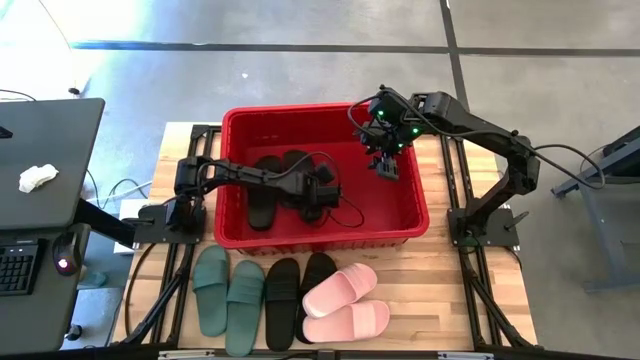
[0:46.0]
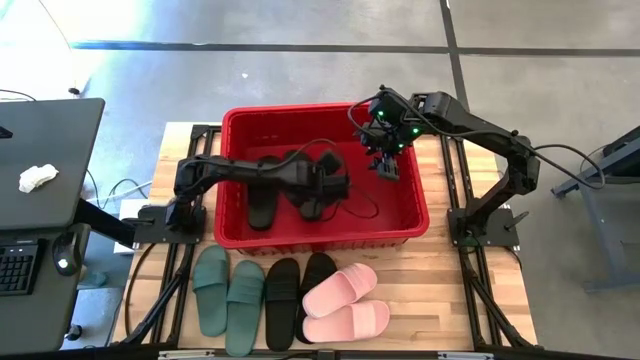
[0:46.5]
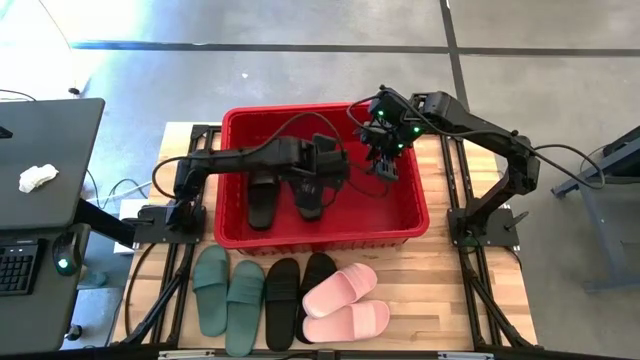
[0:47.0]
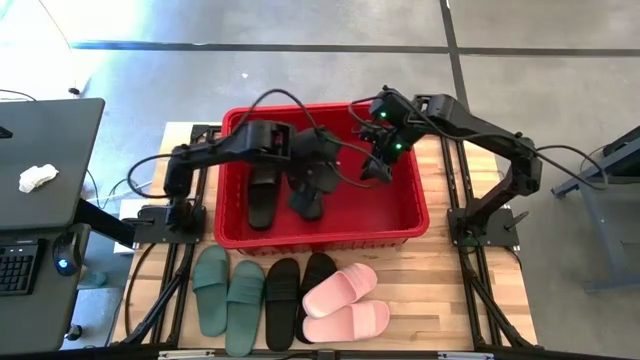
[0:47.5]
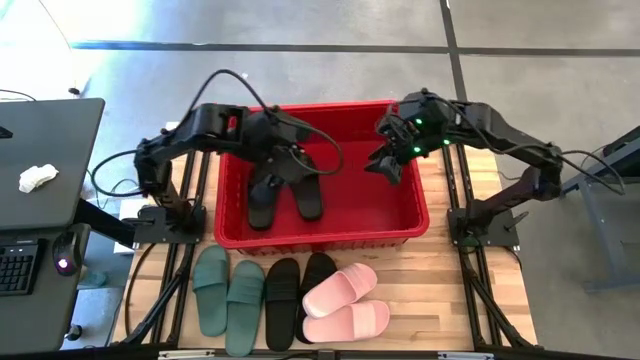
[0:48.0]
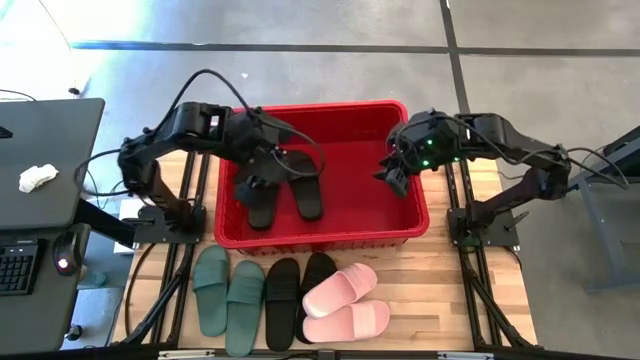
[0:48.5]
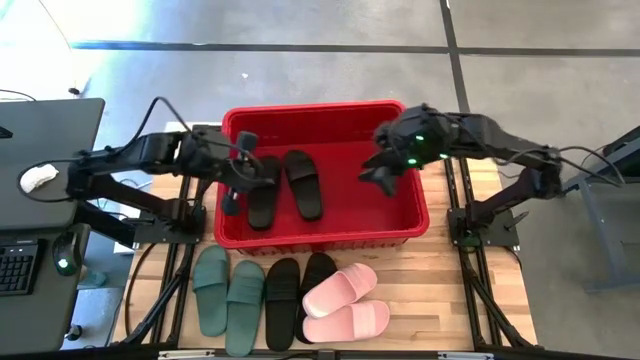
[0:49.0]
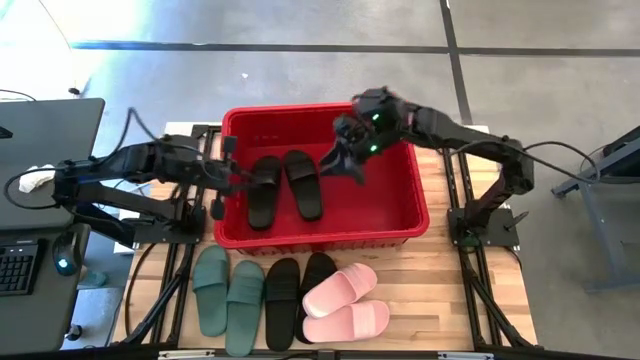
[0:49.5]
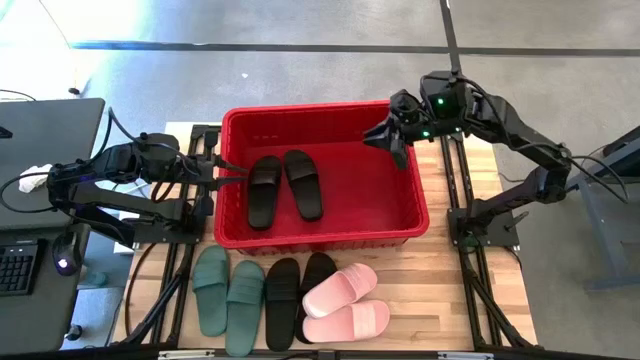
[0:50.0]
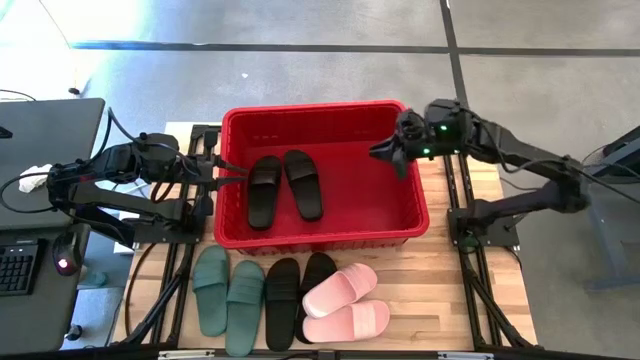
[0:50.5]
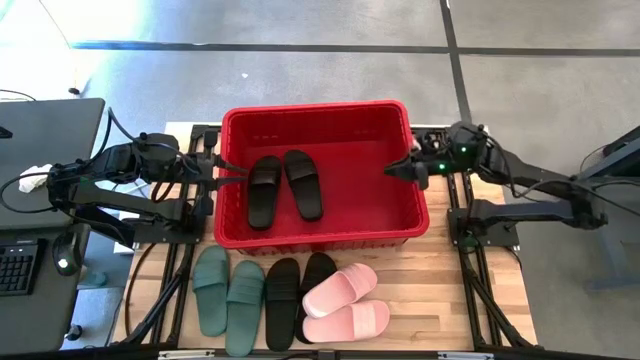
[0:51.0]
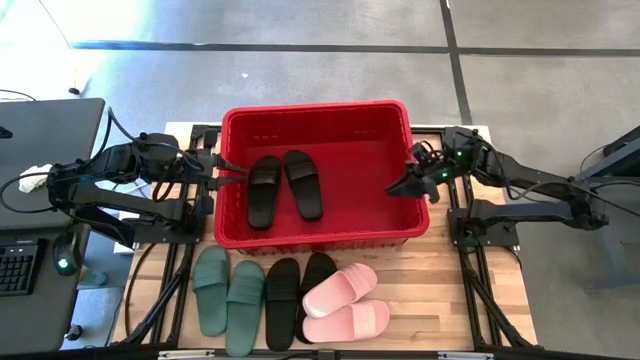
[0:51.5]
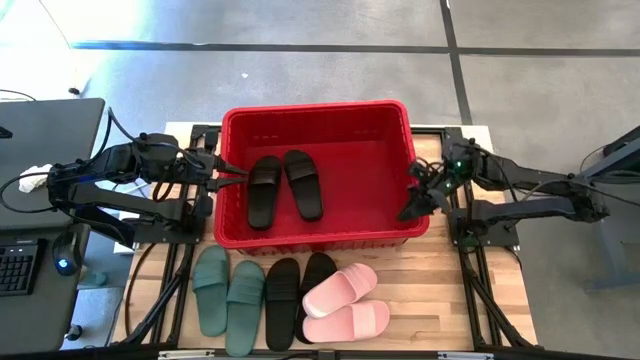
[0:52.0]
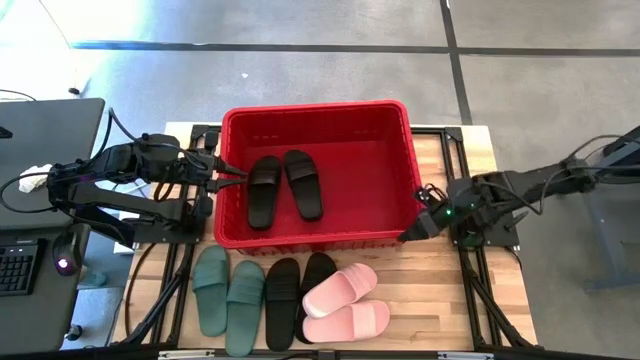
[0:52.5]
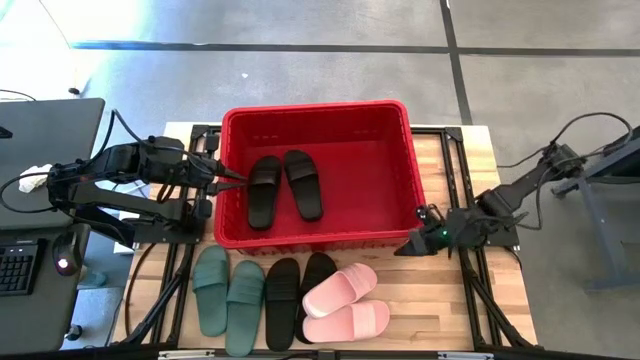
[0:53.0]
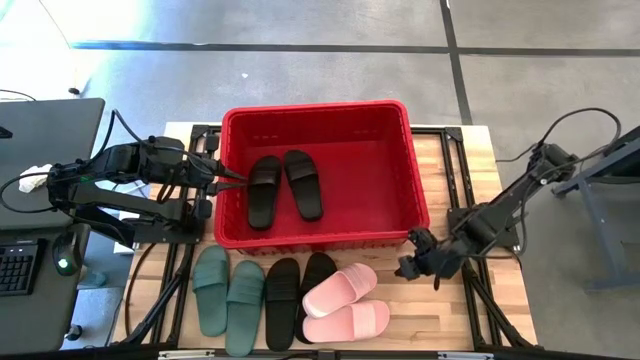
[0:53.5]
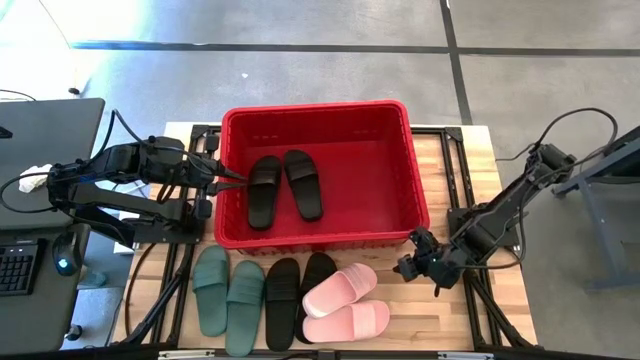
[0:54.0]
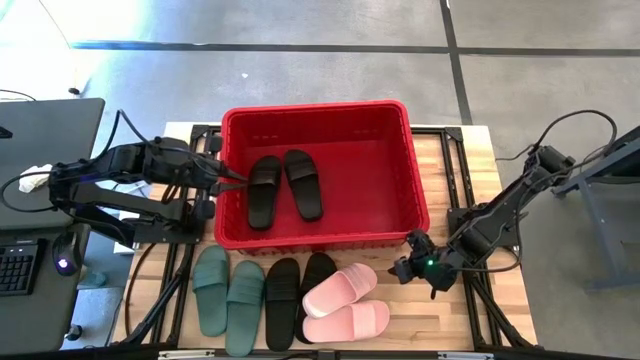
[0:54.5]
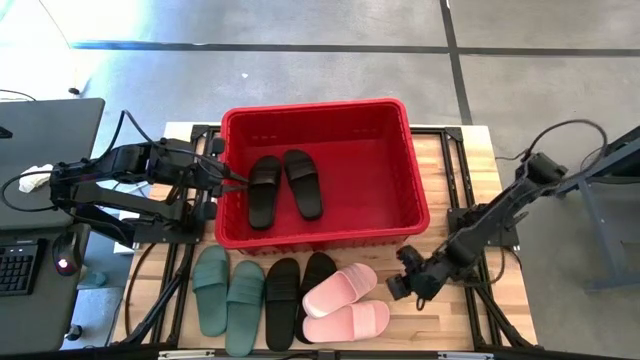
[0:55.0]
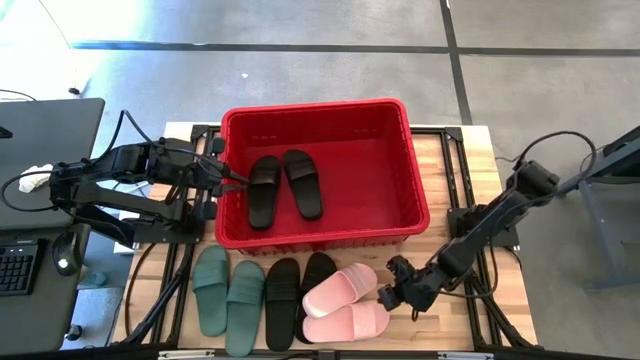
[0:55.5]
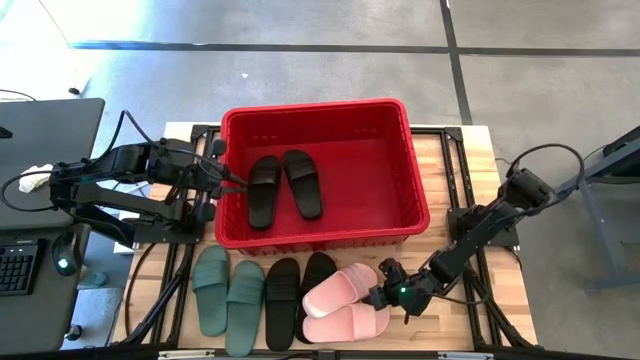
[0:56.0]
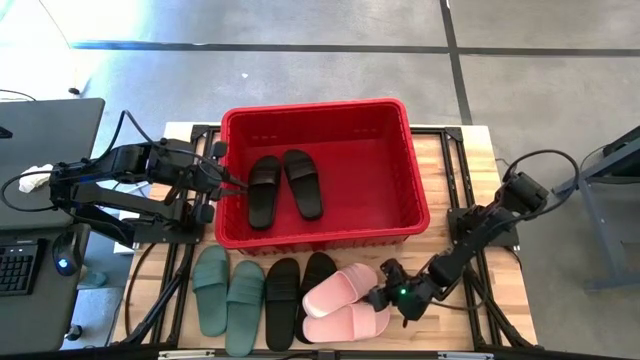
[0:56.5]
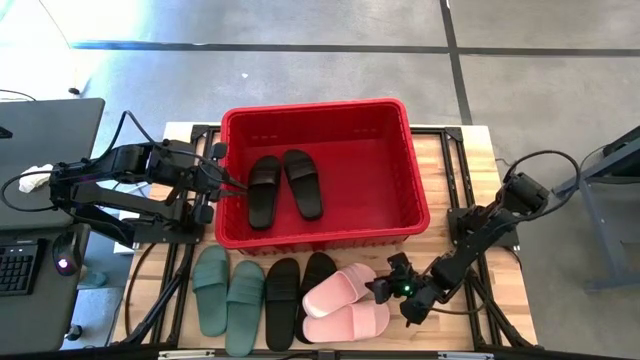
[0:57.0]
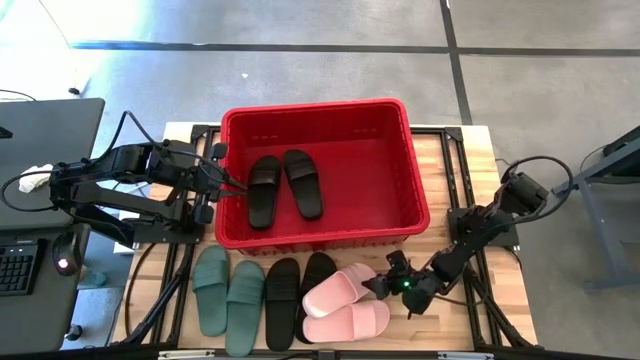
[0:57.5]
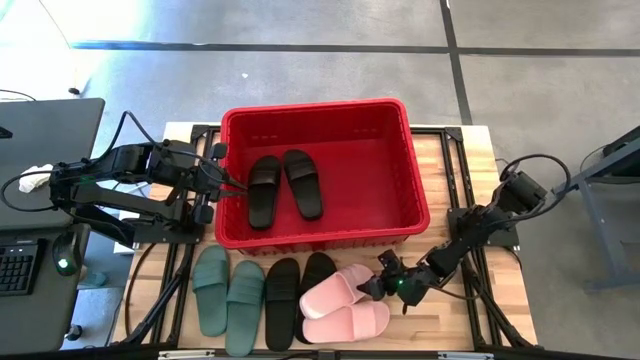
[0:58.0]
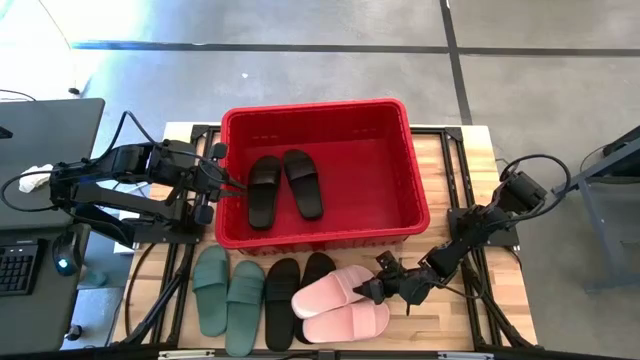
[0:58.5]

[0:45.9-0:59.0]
Task: Pick and place slides into bin
Put the pink slipper into the red bin

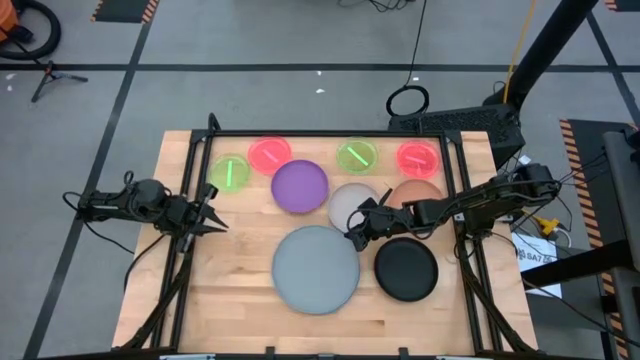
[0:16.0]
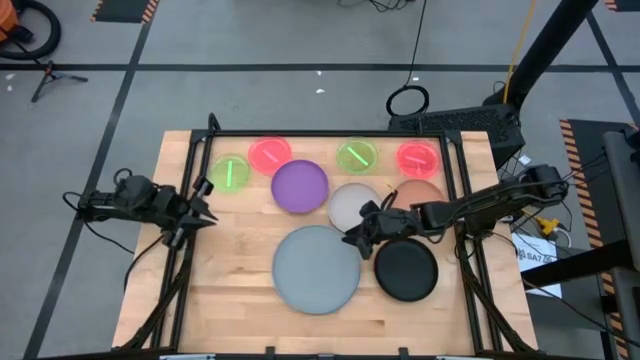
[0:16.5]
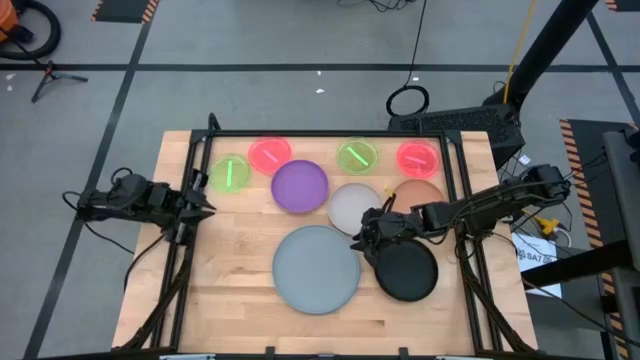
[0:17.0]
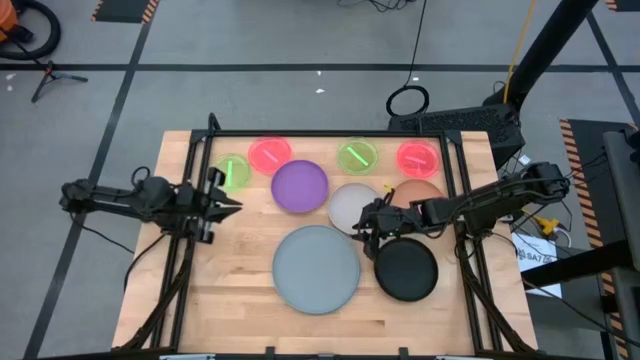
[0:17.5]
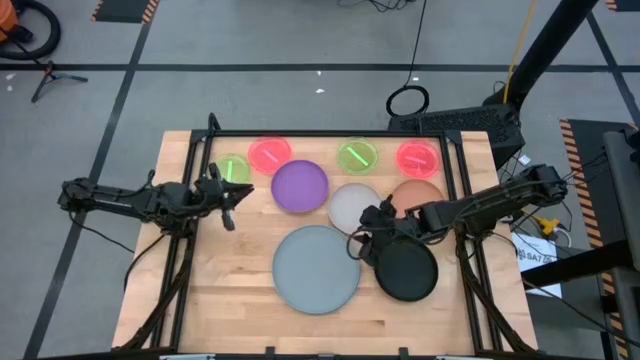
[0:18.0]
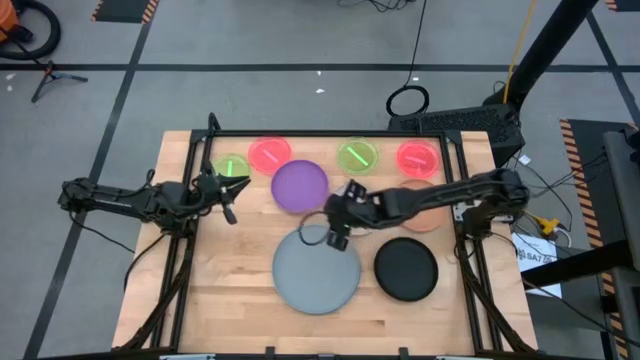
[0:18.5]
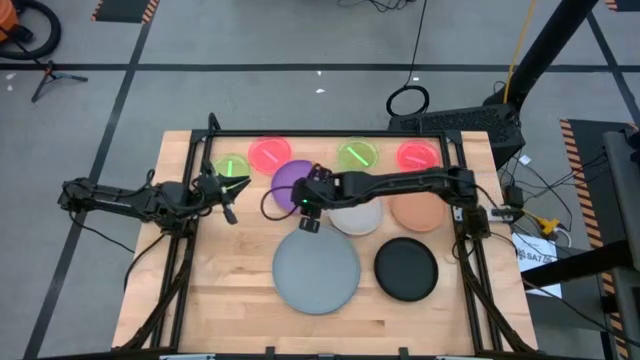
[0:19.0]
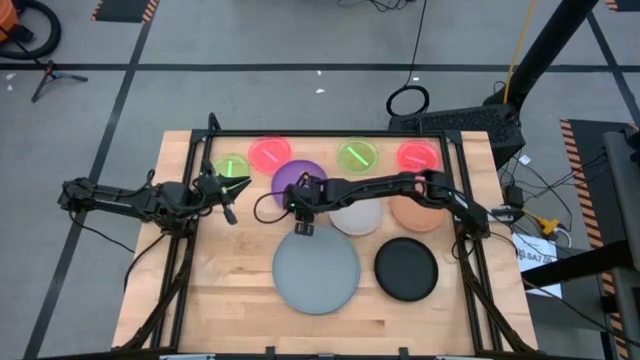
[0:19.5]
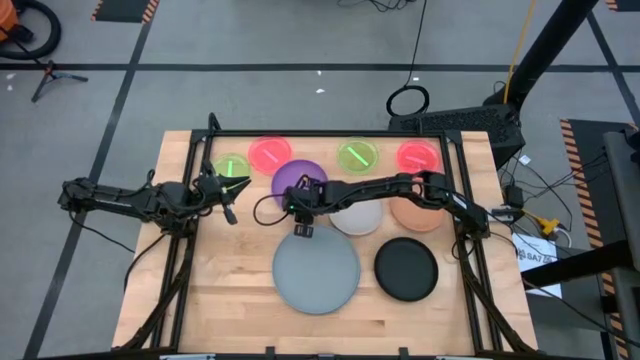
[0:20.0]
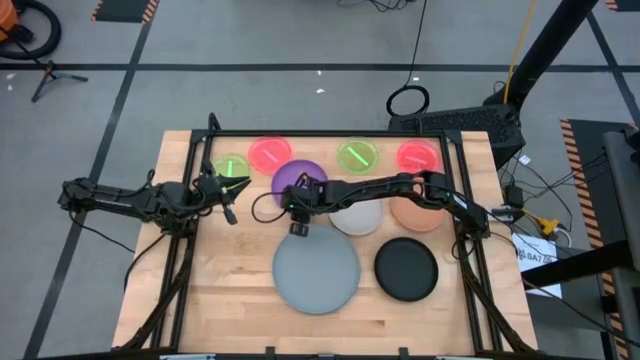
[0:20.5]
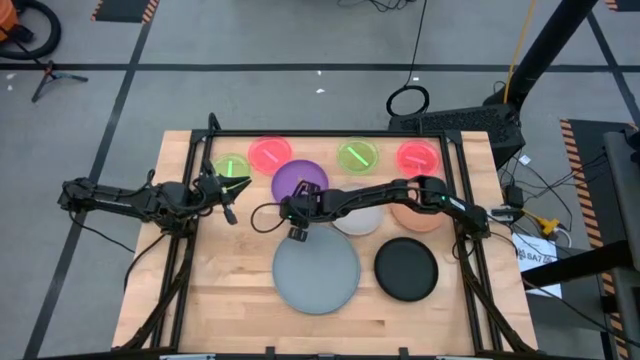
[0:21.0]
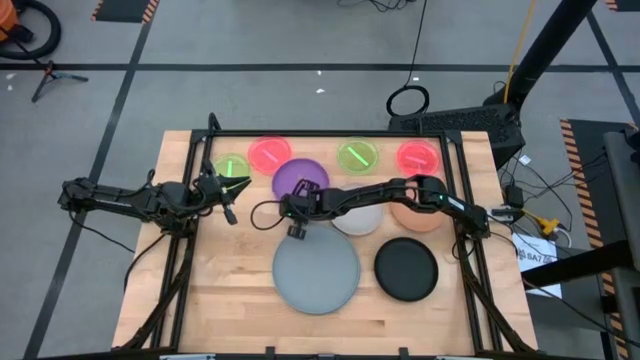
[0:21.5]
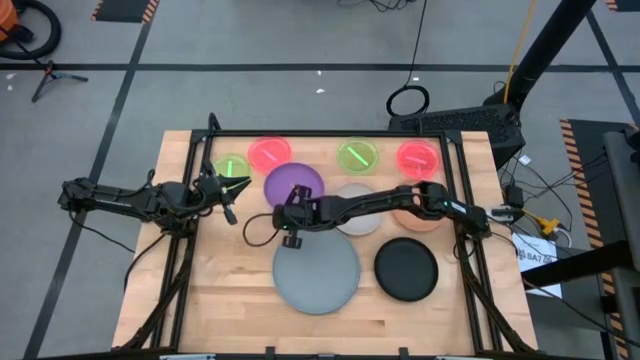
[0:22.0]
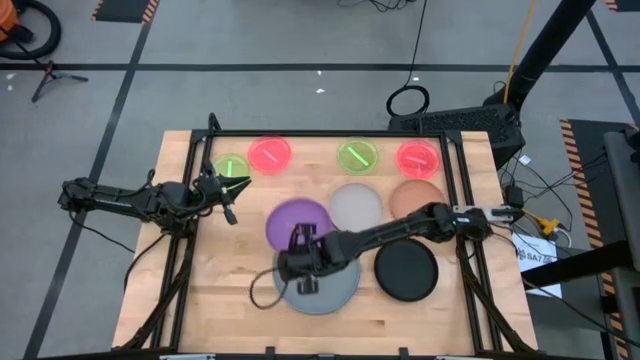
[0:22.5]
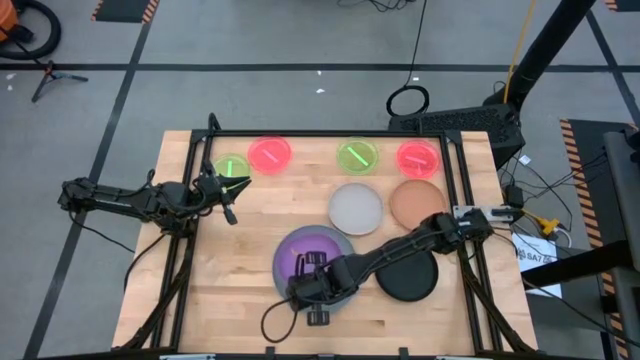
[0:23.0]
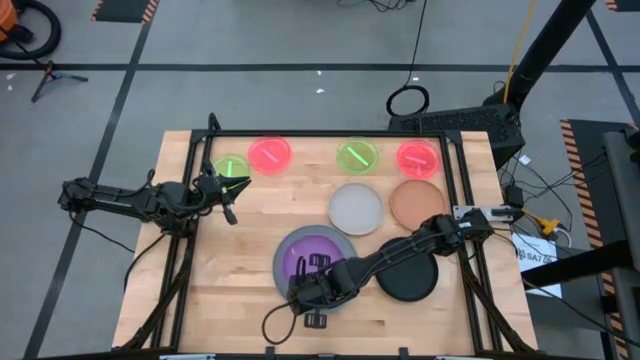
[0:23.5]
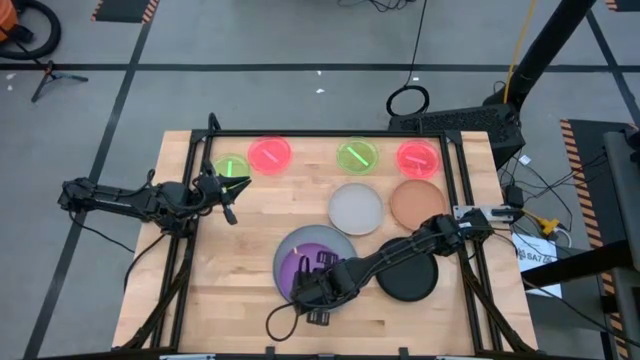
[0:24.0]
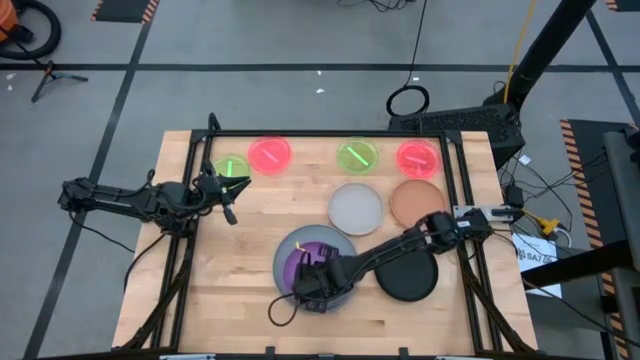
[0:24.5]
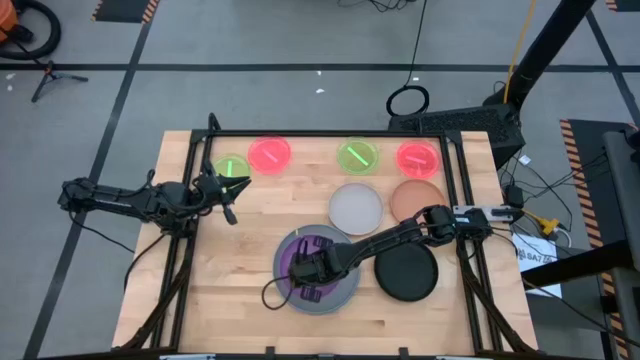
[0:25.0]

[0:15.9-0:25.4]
Task: Stack plastic plates
Stack the purple plate on top of the gray plate
